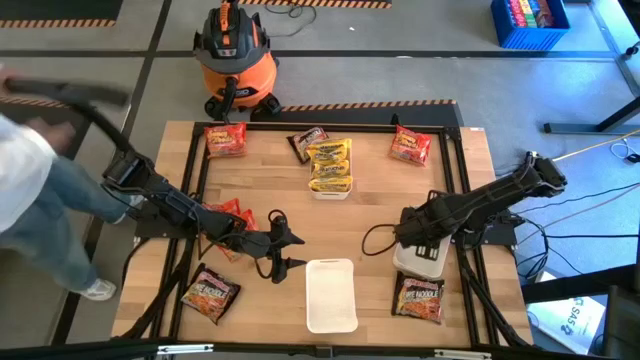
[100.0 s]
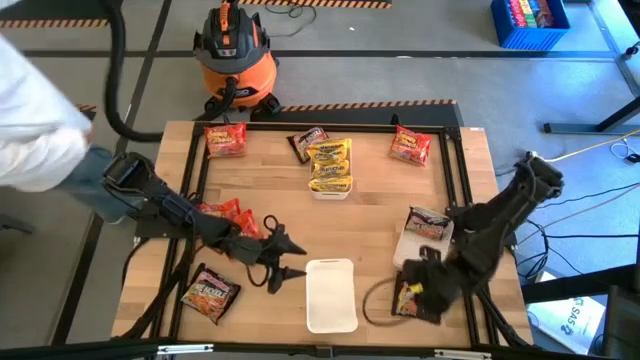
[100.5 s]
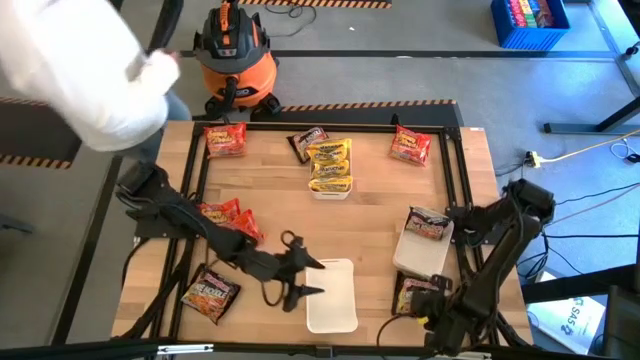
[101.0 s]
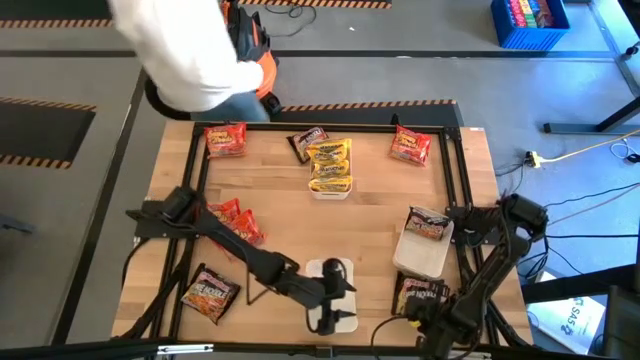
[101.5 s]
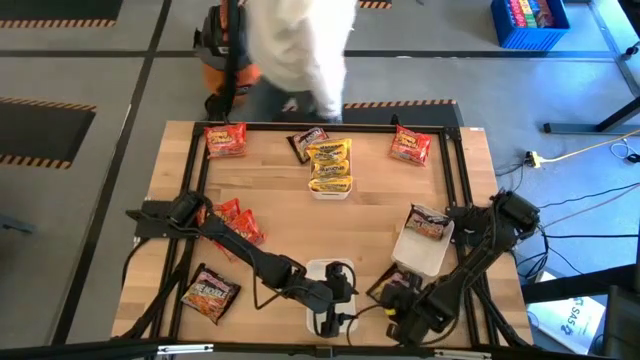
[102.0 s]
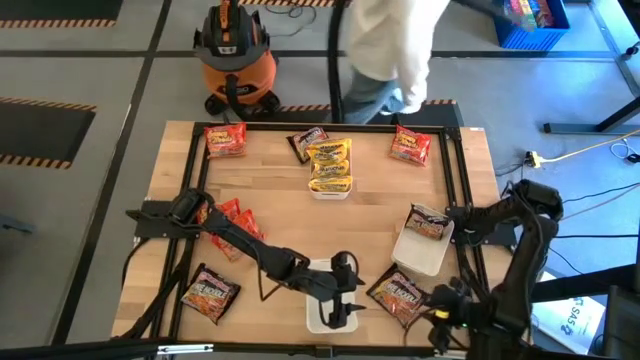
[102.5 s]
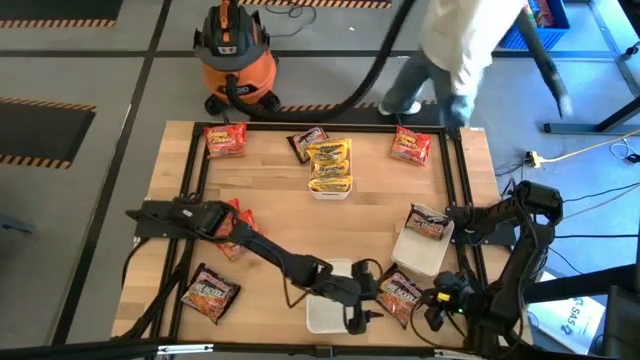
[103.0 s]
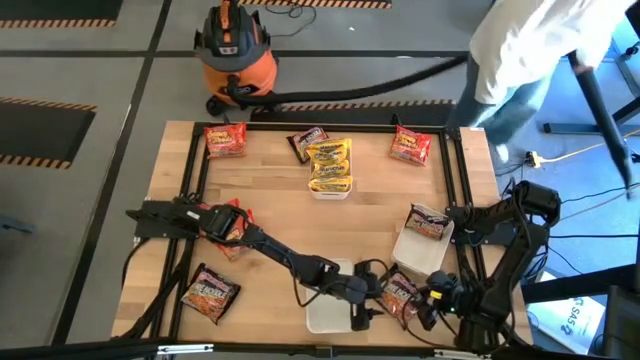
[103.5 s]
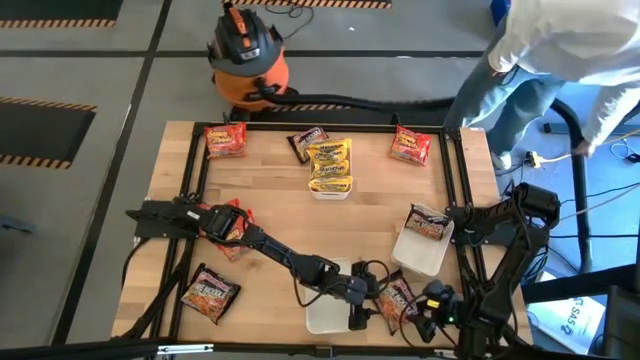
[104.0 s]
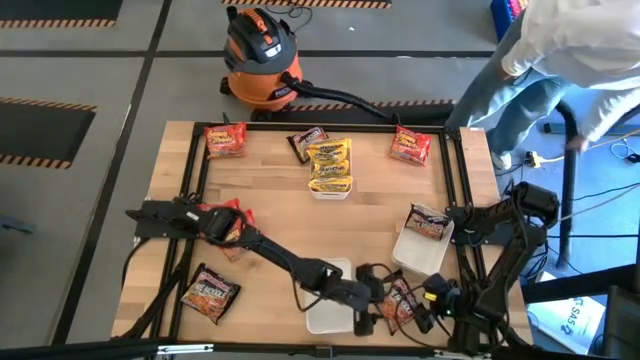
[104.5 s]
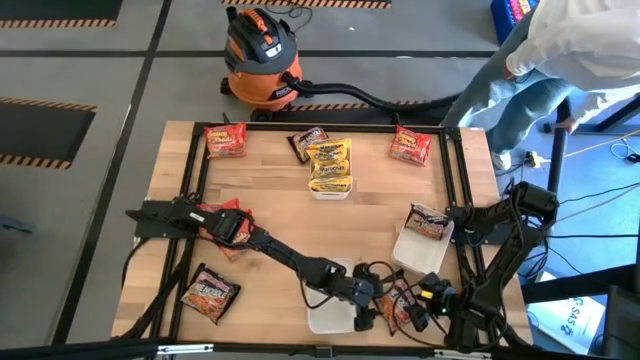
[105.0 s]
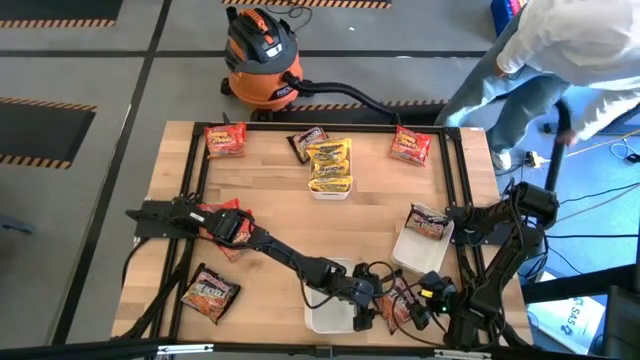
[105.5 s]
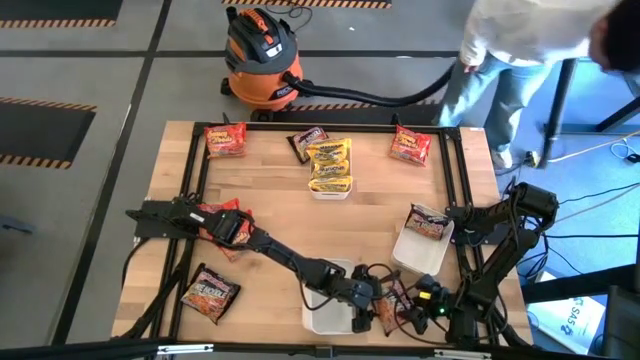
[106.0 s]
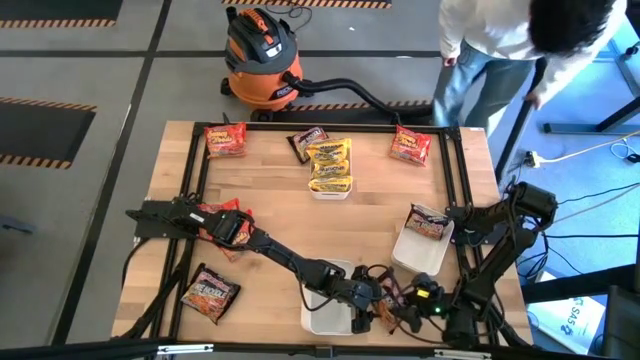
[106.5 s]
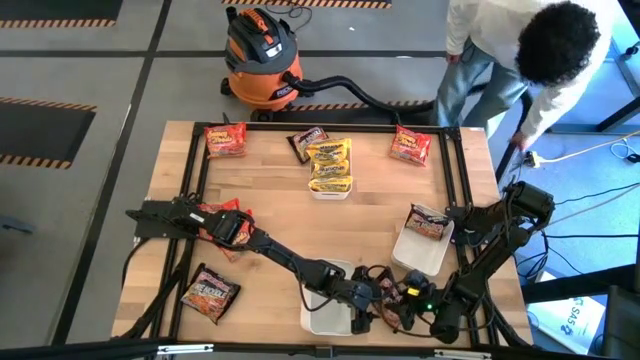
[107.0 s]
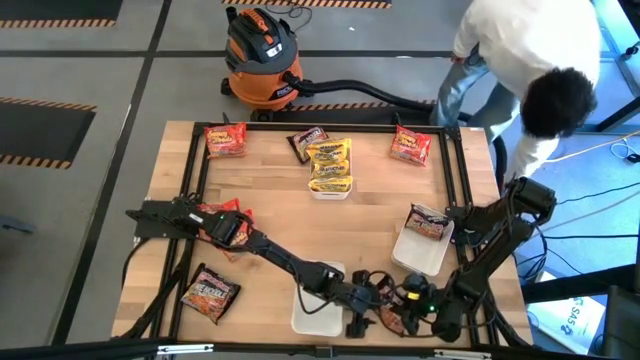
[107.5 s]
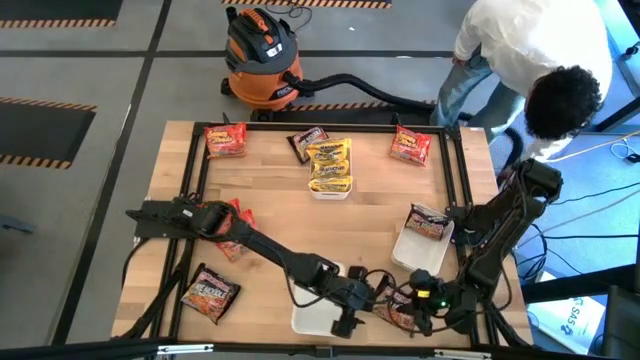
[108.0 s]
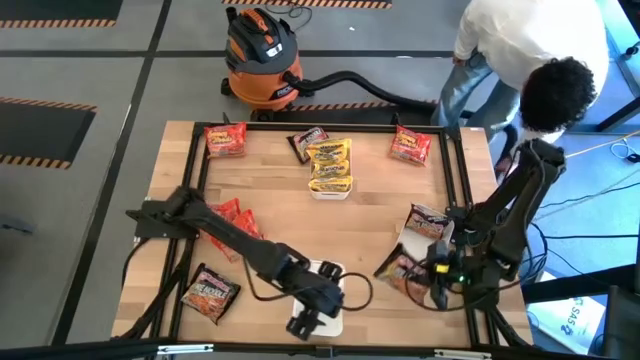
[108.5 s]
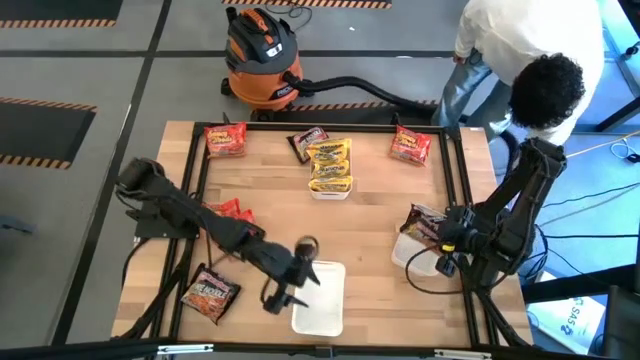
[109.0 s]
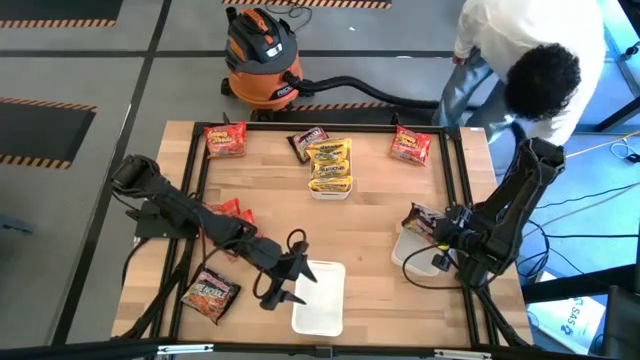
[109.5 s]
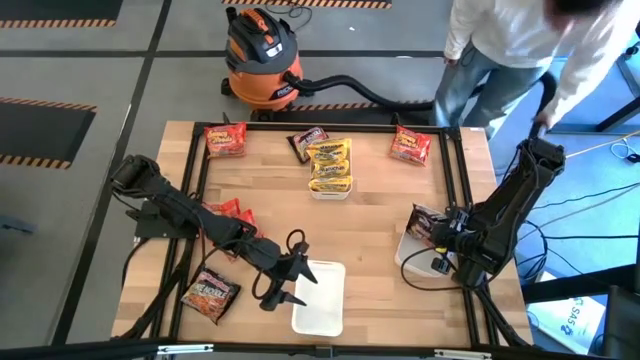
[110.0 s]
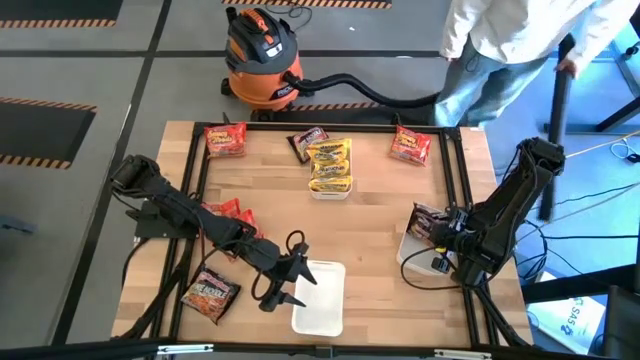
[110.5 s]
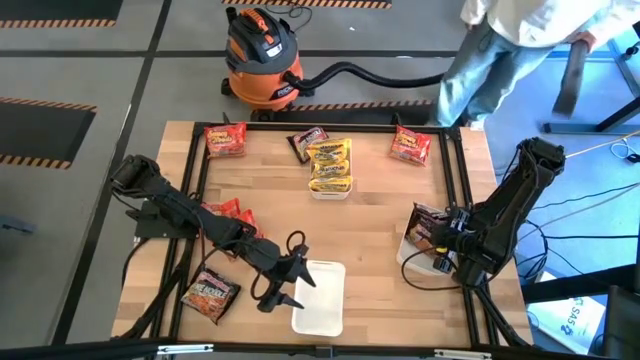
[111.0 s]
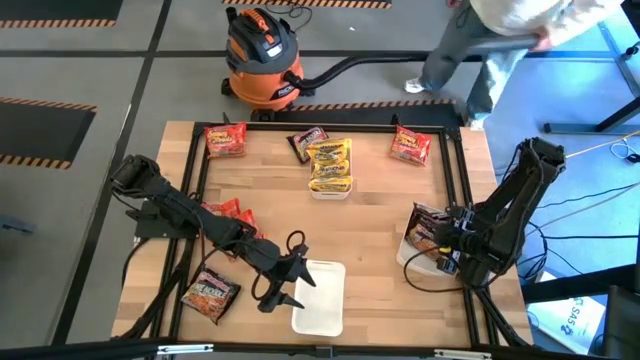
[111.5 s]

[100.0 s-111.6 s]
Task: Sort Maruchan noodles
Put the bottom right black noodle pack into the right white bin

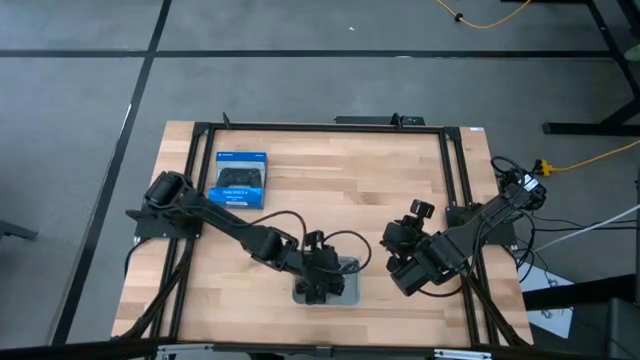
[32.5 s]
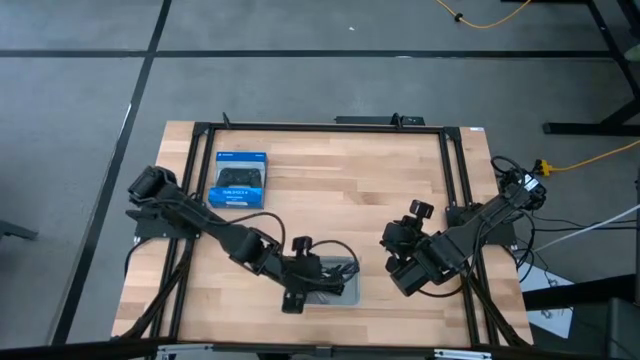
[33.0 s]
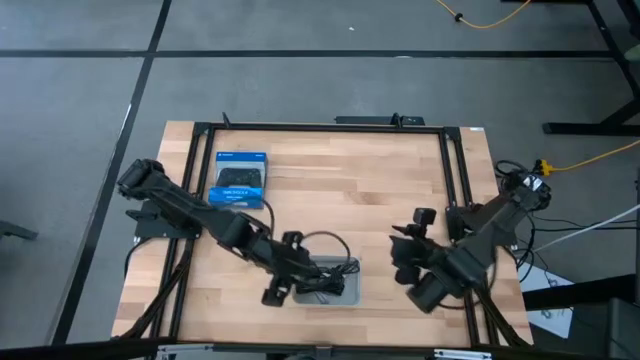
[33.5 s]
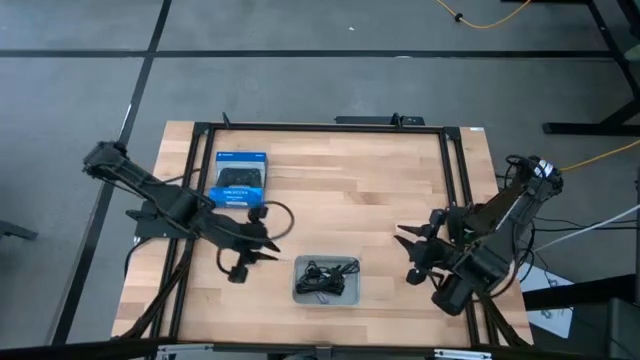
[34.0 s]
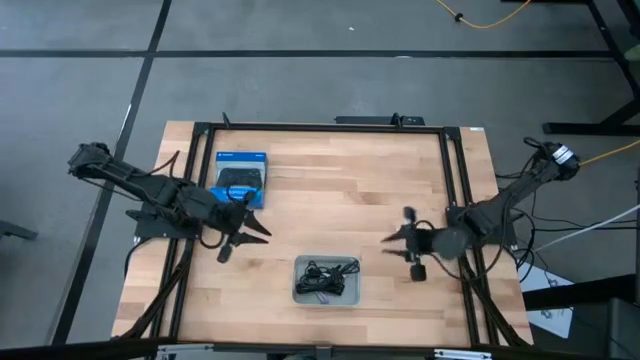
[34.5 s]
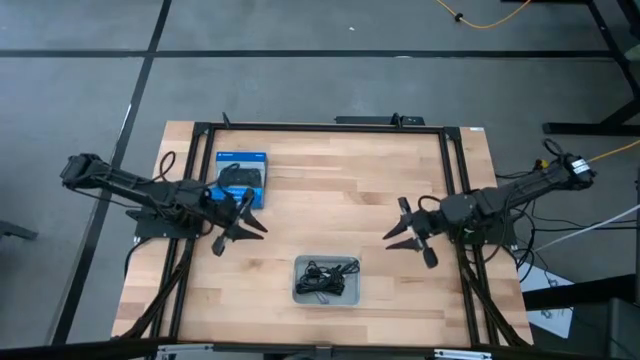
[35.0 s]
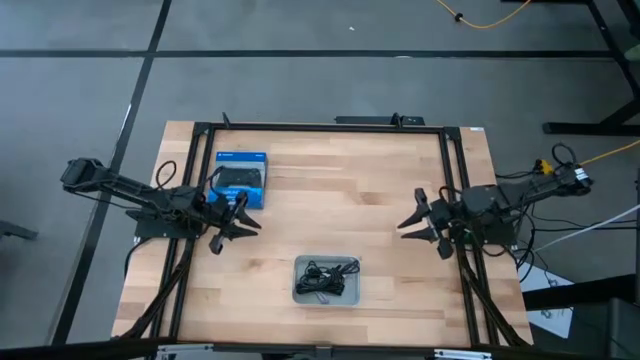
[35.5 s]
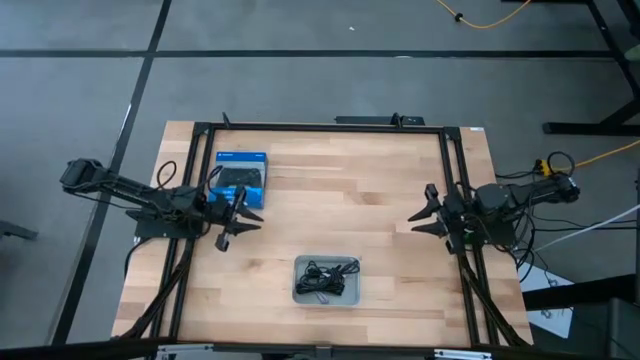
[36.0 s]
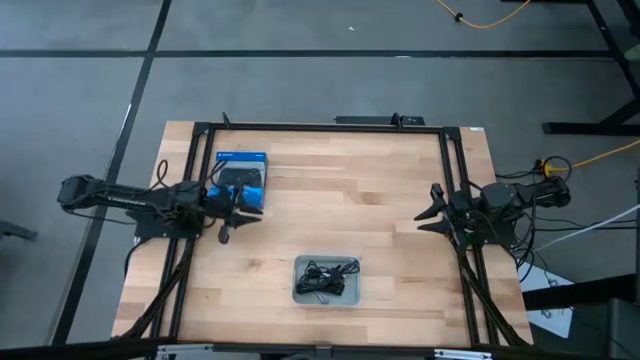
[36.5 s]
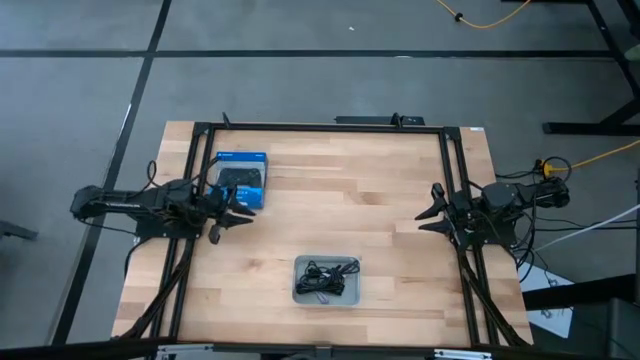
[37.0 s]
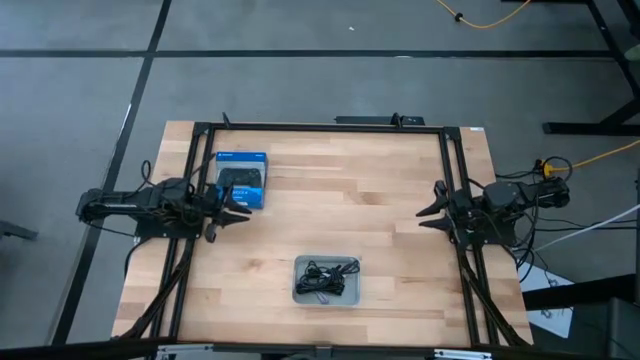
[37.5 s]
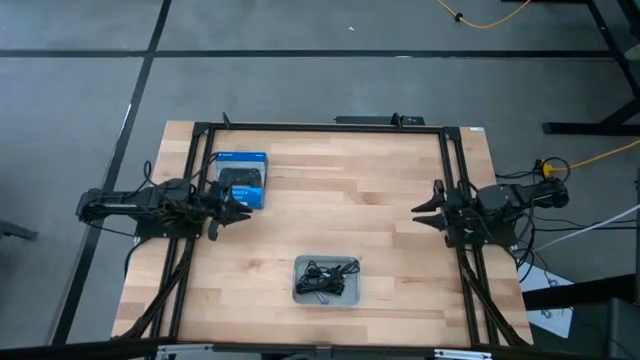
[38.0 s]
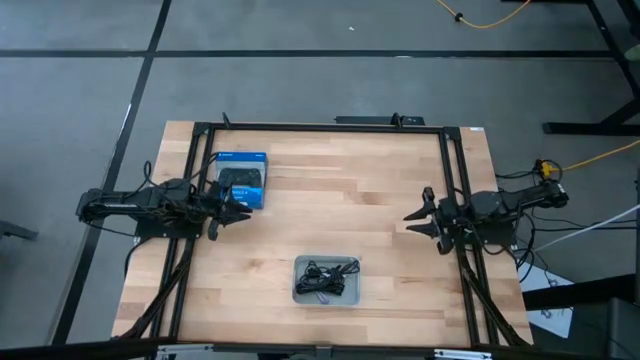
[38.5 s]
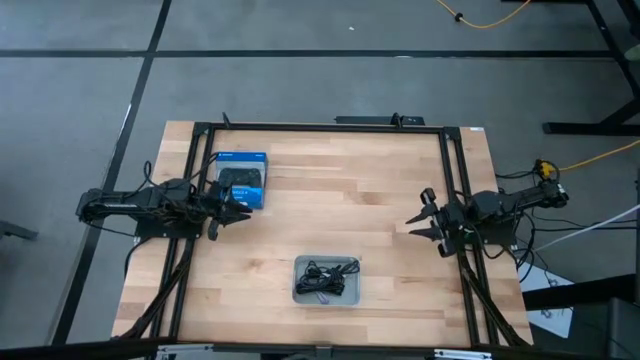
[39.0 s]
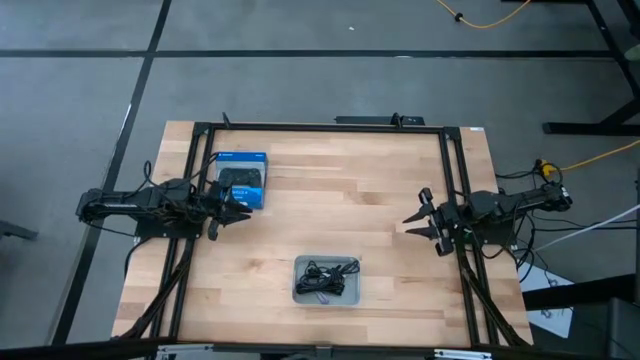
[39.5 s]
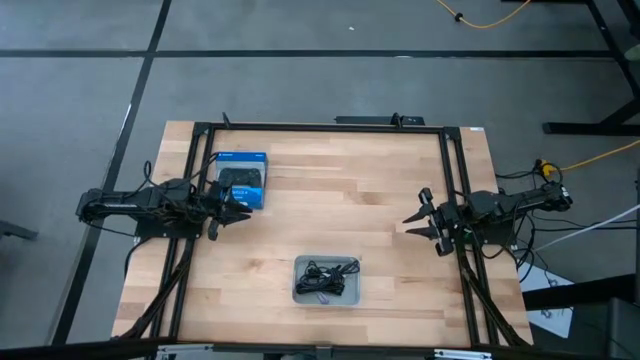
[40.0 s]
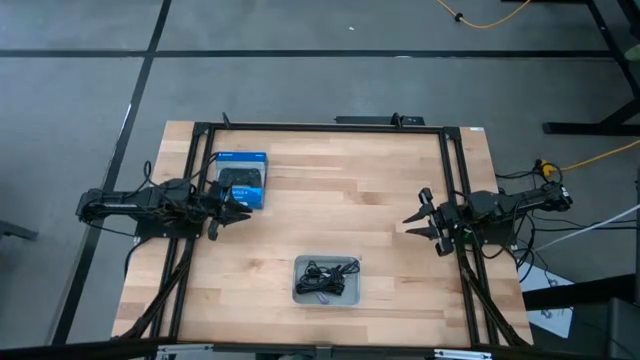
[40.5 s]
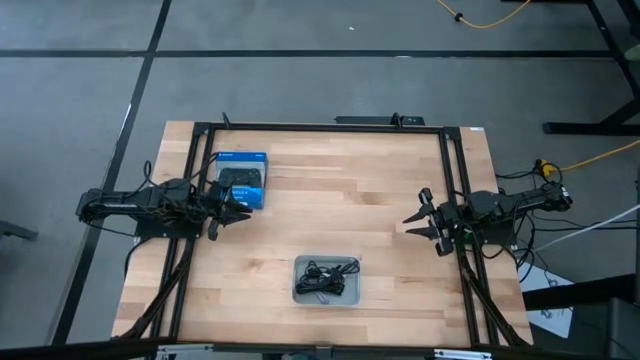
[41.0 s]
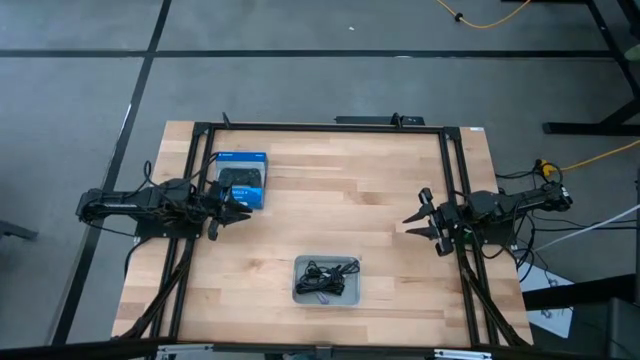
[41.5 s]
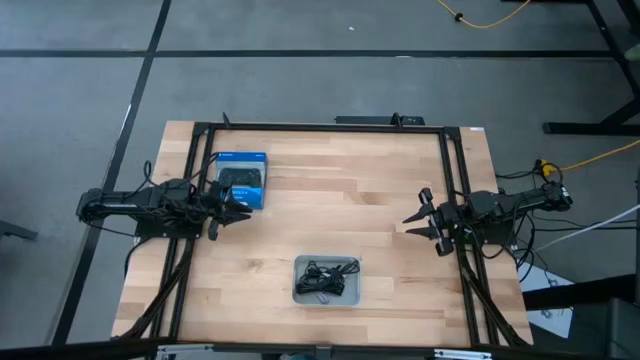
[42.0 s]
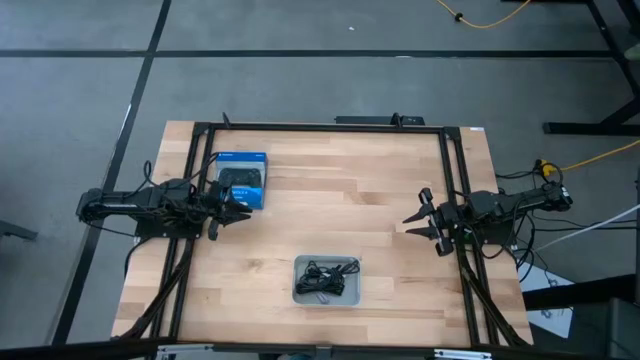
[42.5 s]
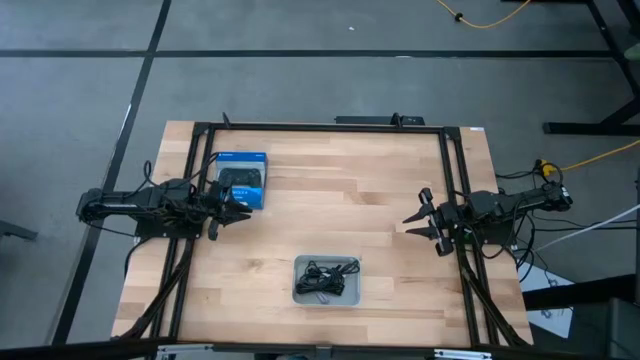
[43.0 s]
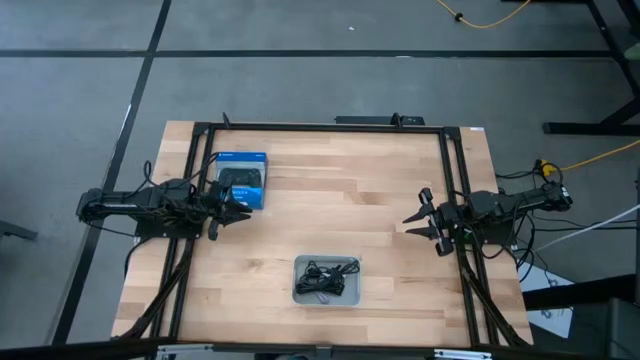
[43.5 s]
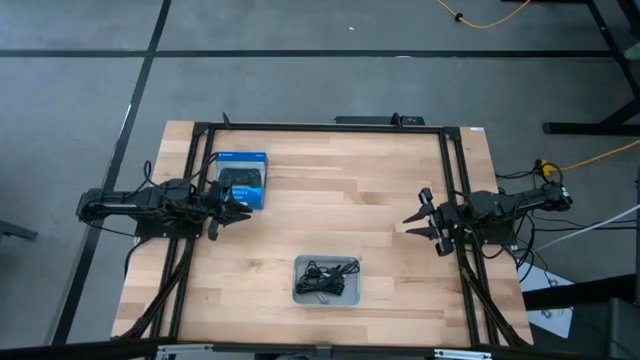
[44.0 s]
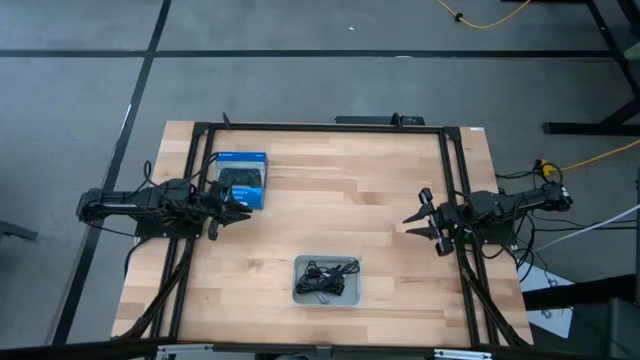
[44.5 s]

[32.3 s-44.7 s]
Task: Pick and place USB-C Cables
Return to Home Position
